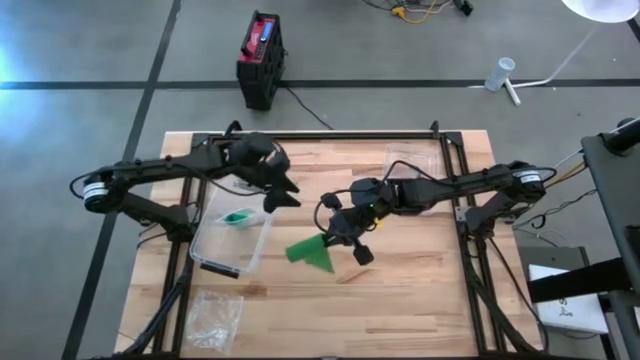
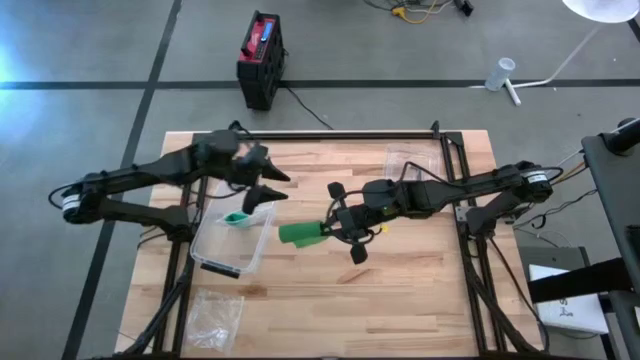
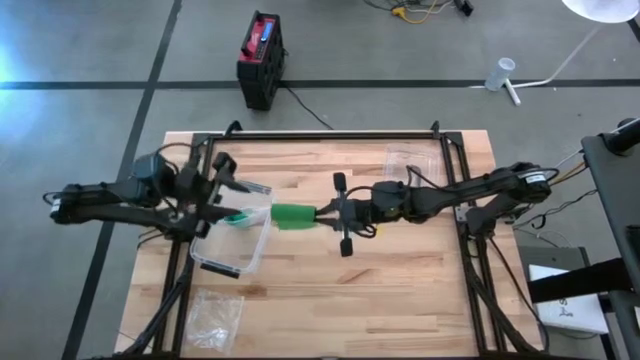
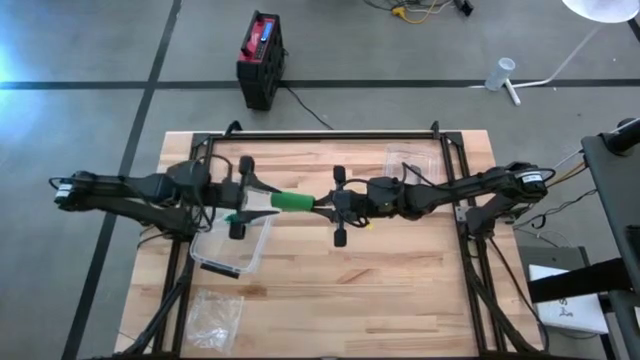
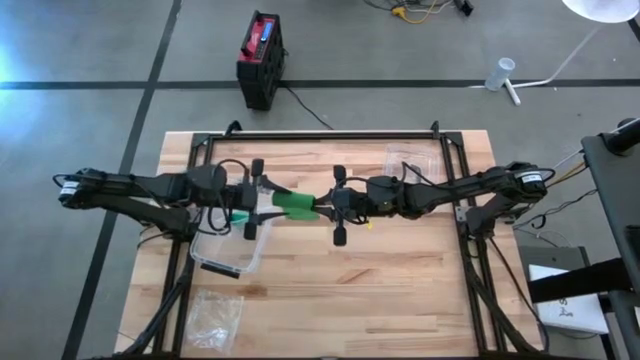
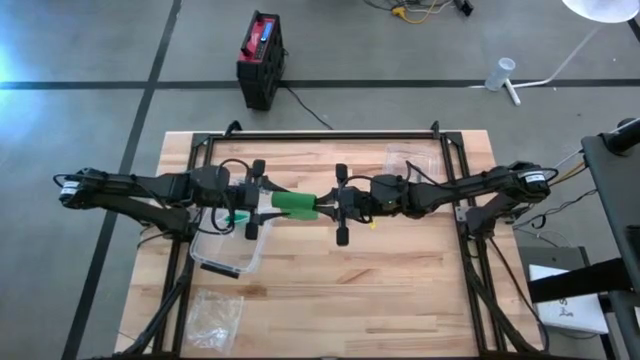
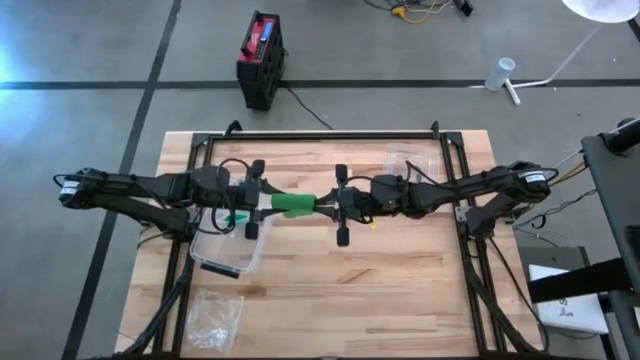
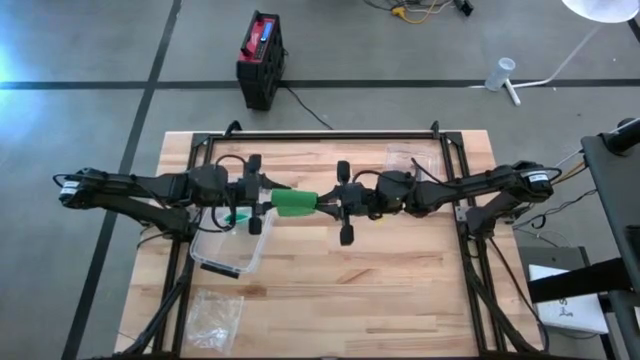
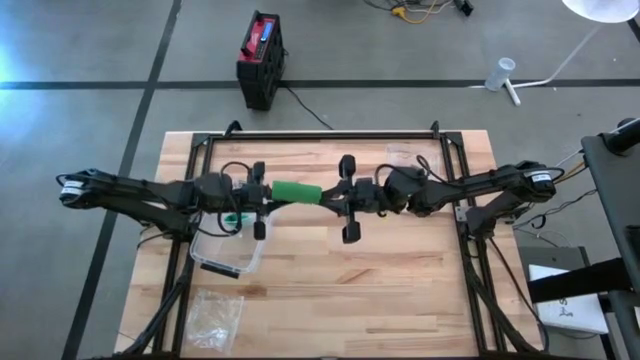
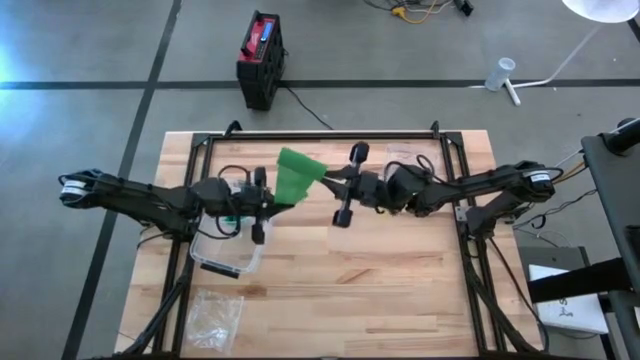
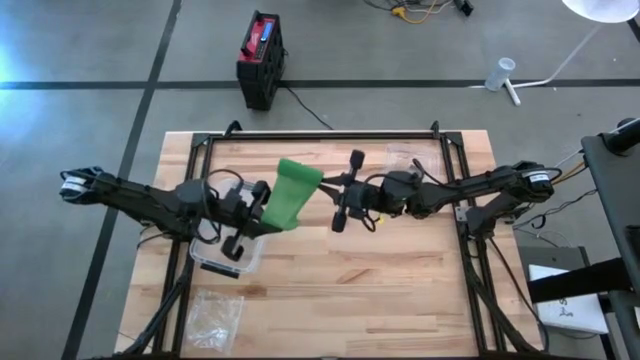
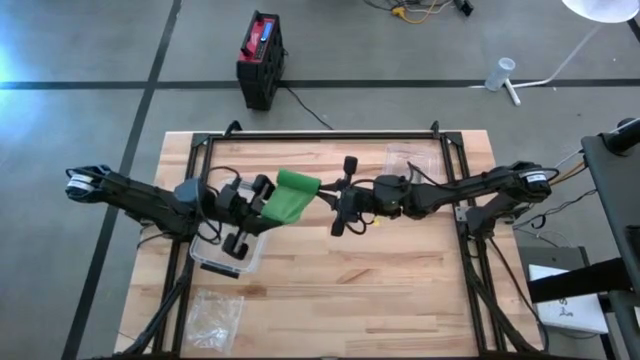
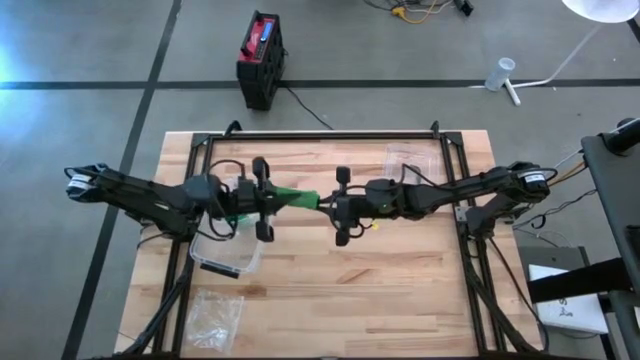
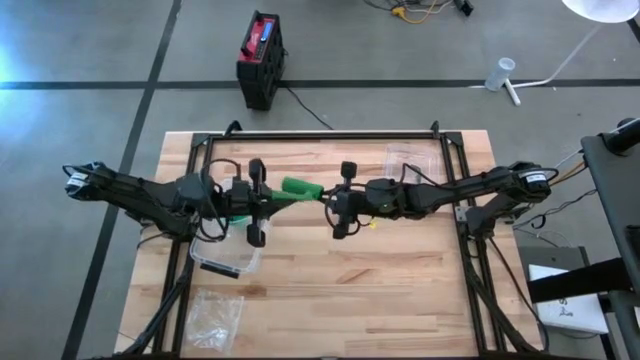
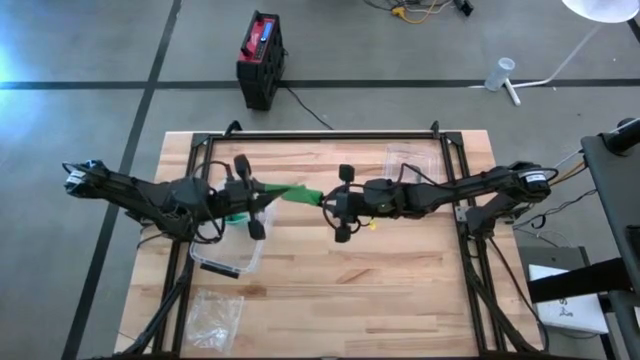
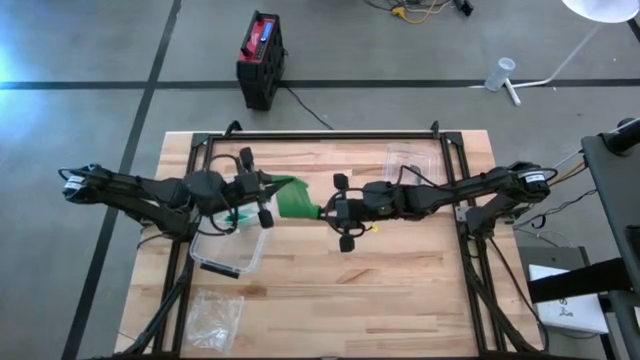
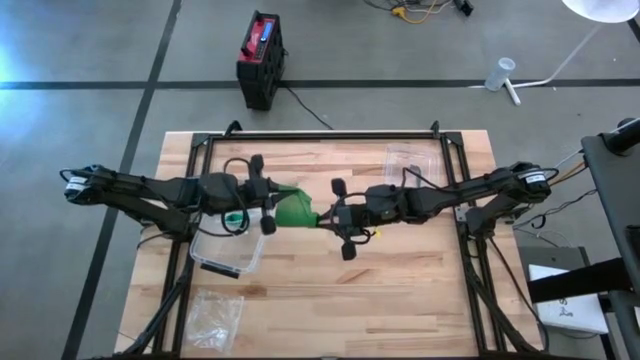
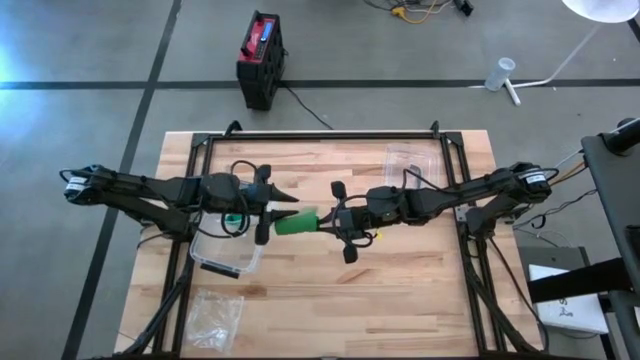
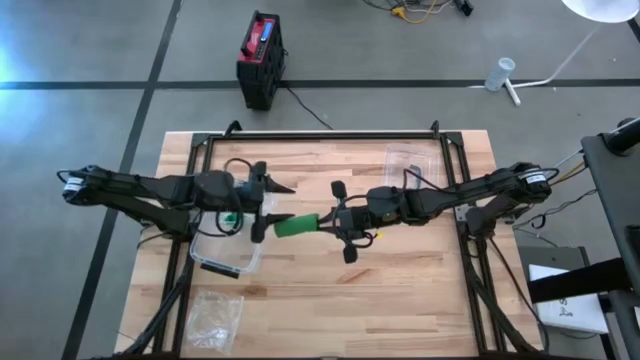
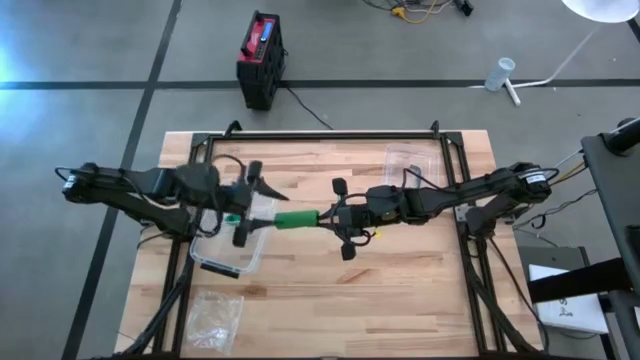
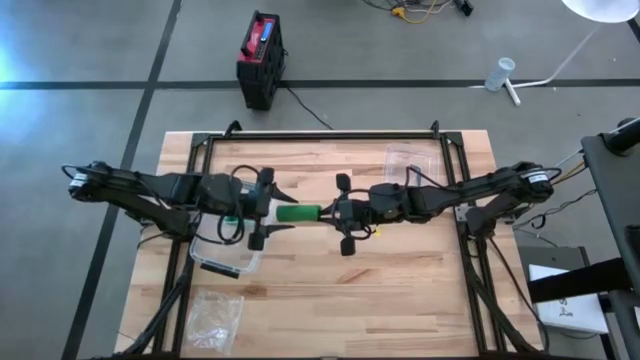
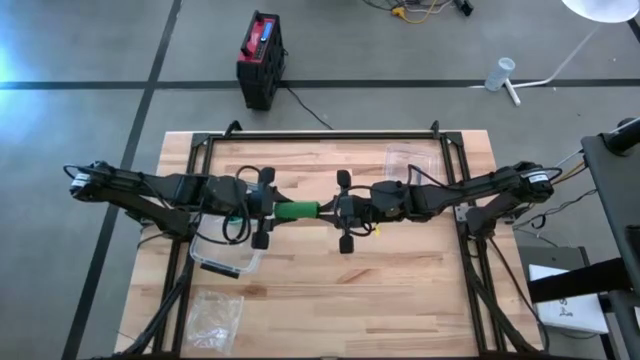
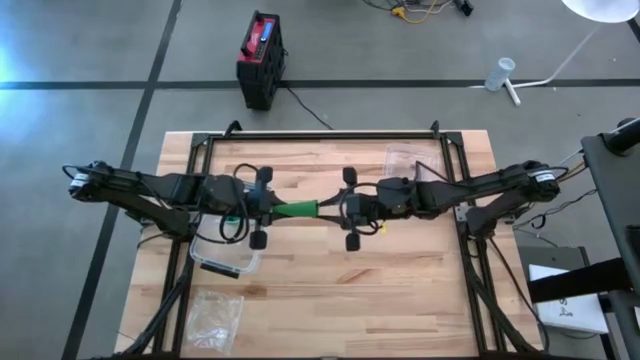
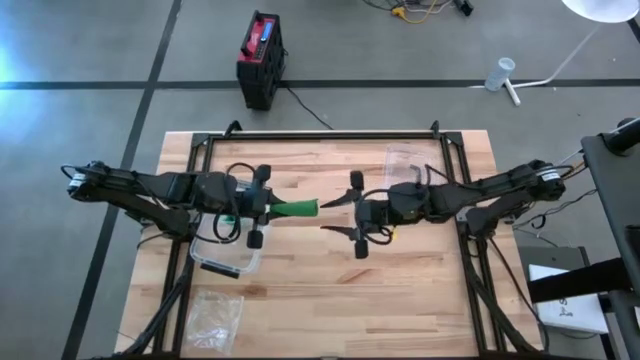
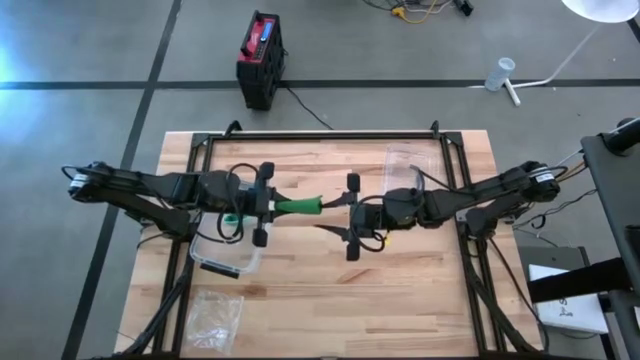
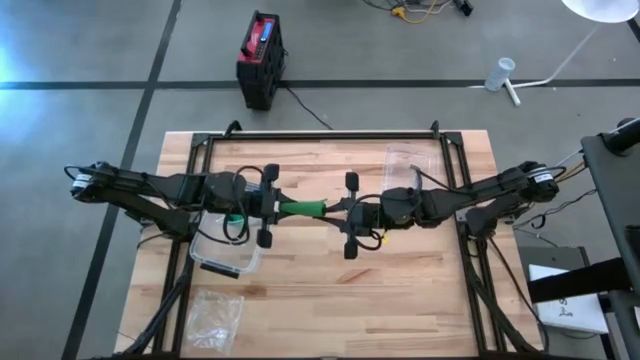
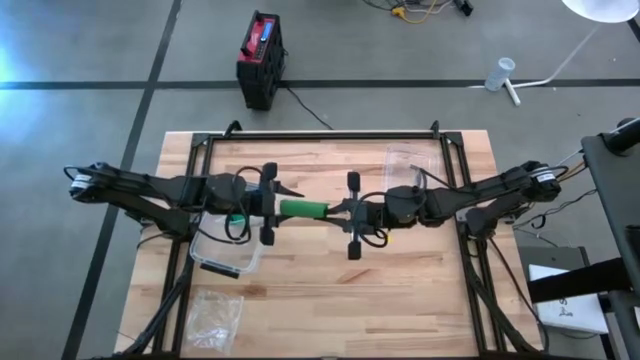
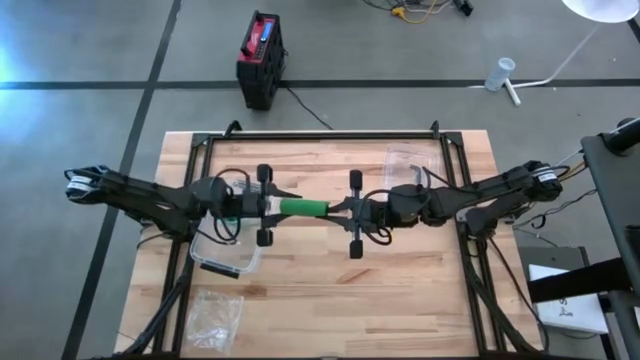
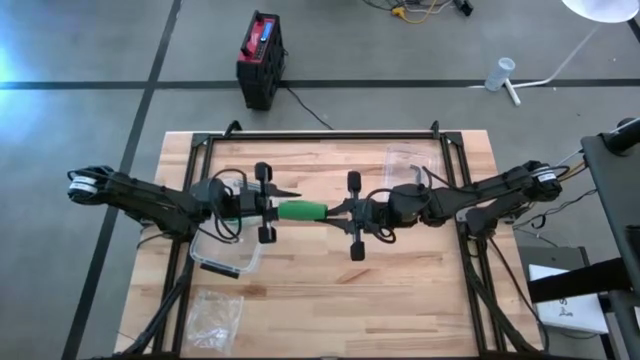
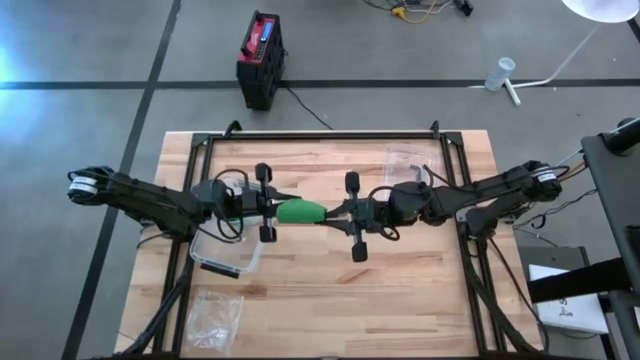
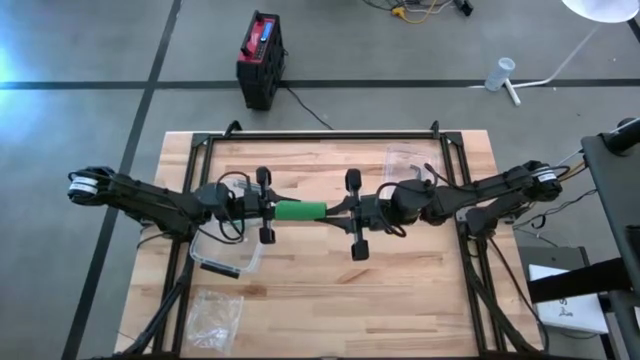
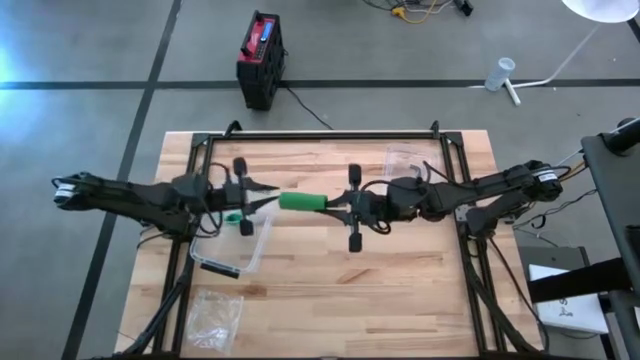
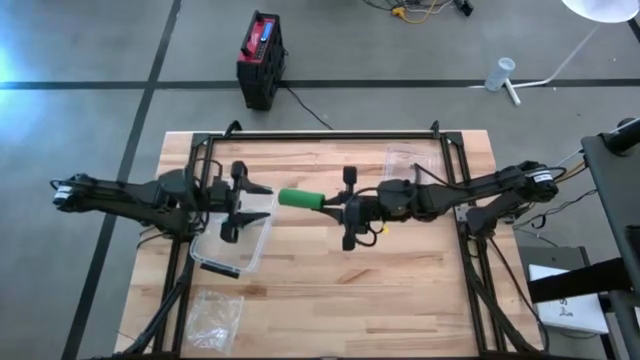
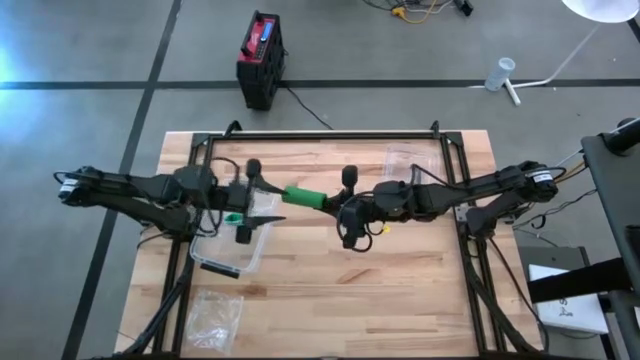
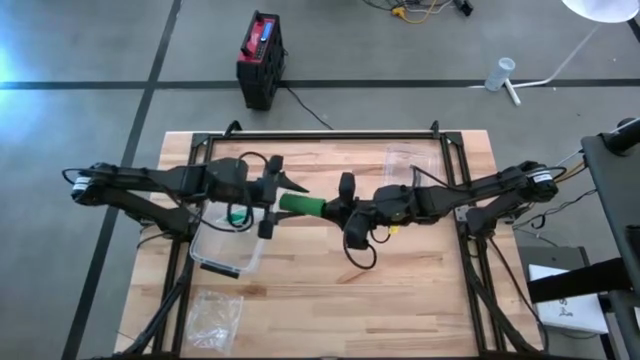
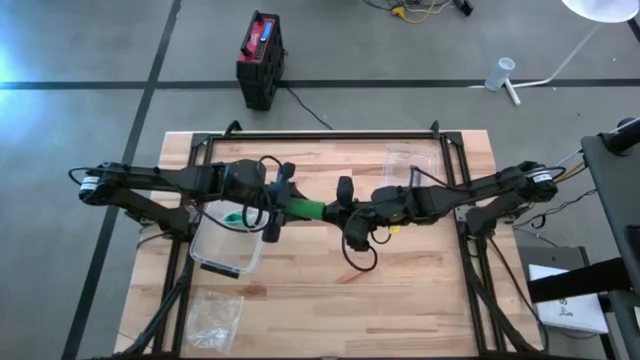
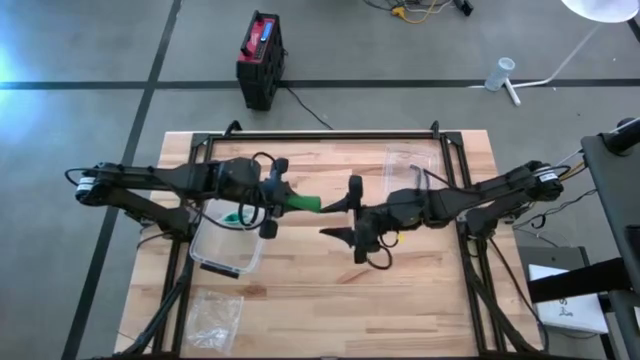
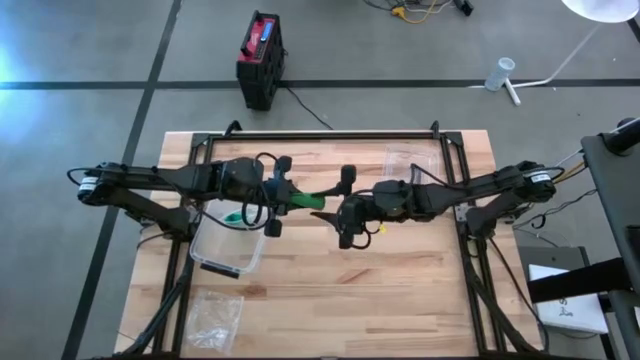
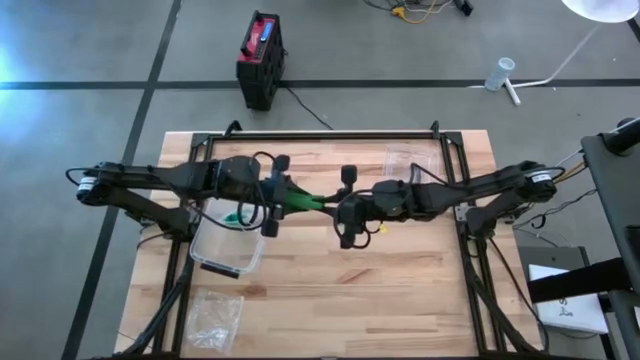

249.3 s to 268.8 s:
Task: Roll bandage
Roll the dark green bandage

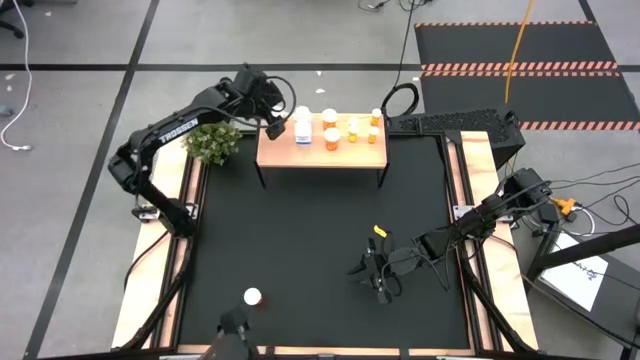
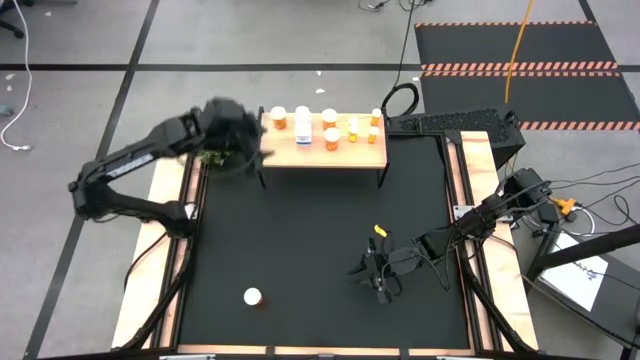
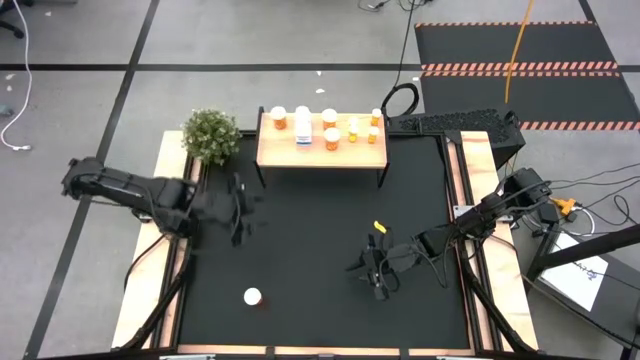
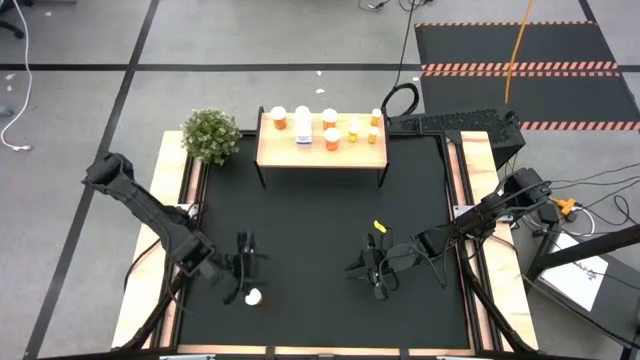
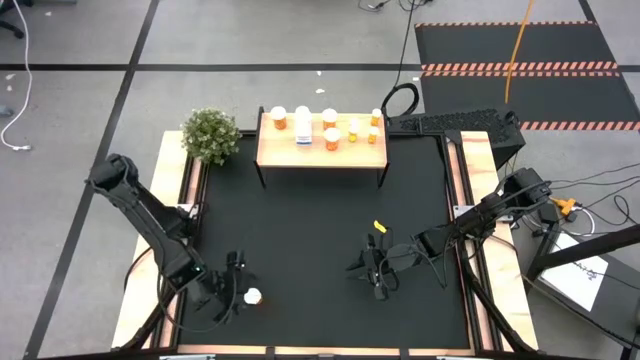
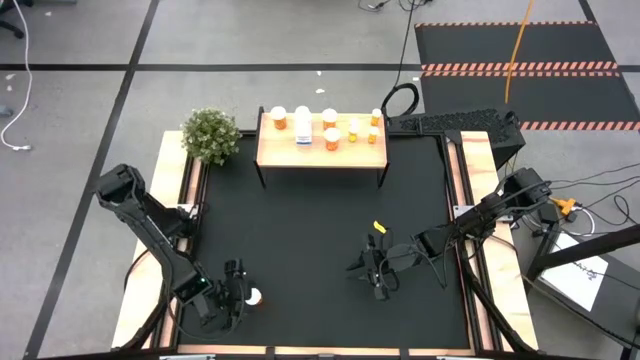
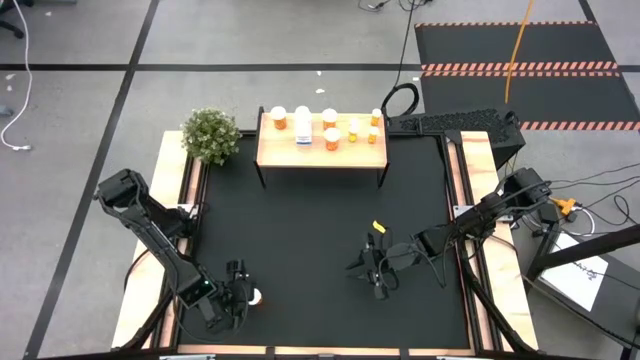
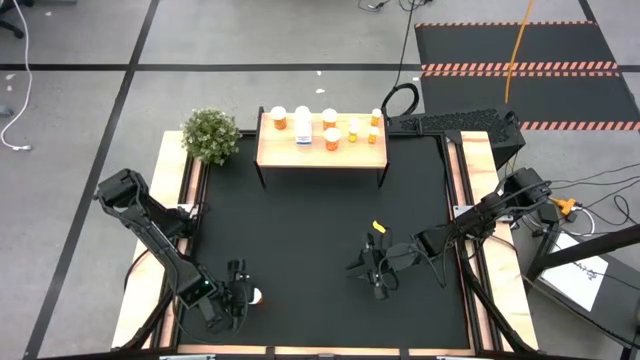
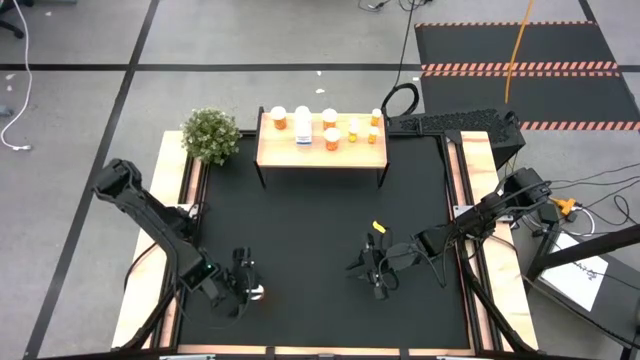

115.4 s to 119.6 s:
Task: Pick and place medicine bottles onto shelf by color
Put the large orange pill bottle on the shelf aligned with the other large orange pill bottle
